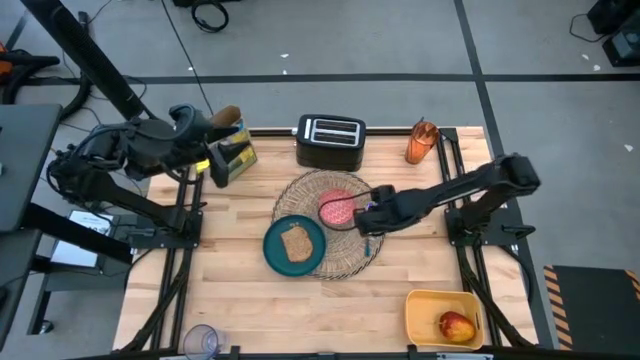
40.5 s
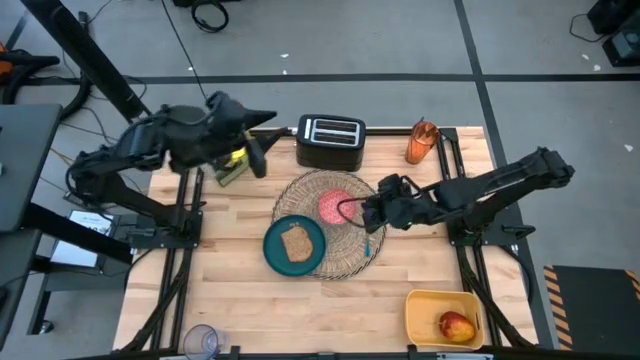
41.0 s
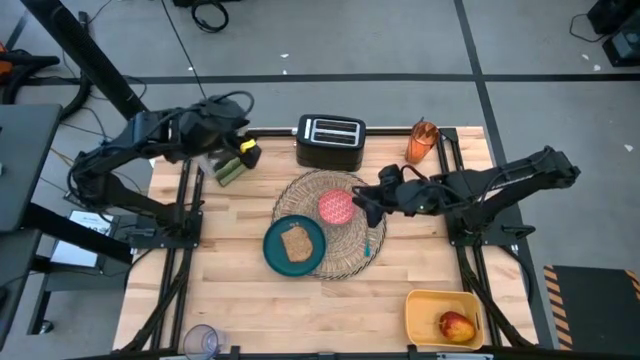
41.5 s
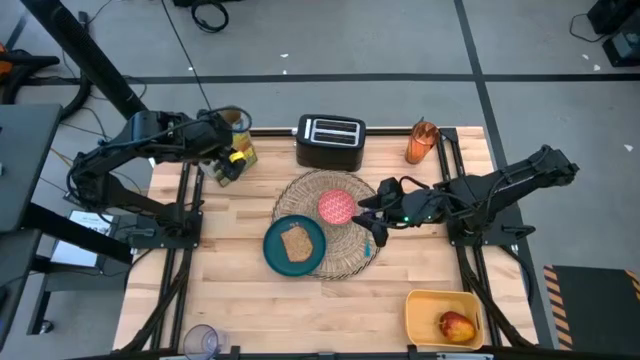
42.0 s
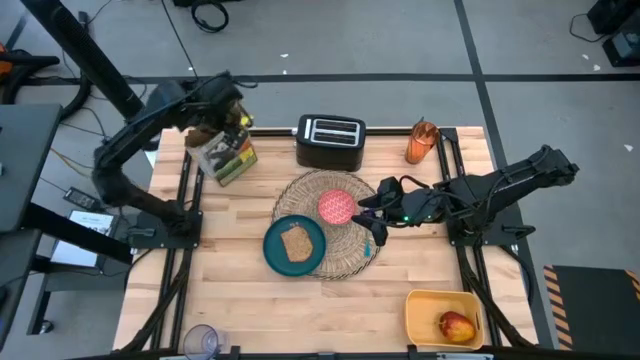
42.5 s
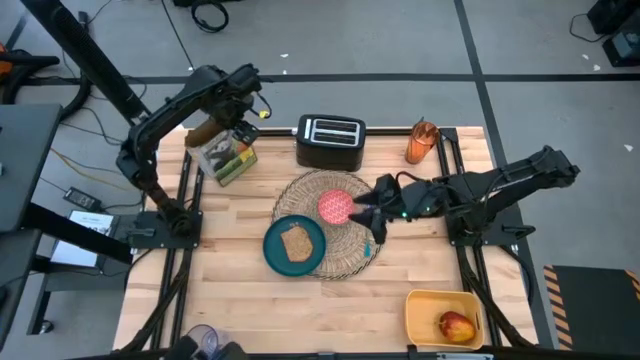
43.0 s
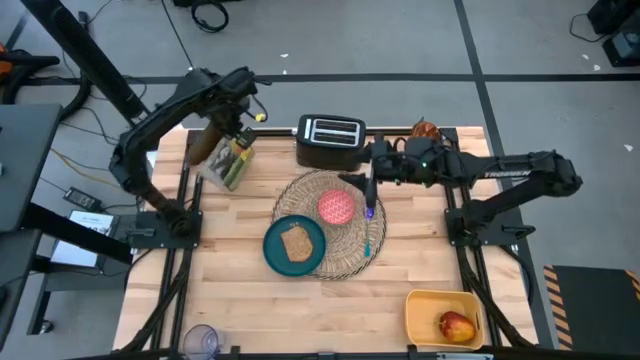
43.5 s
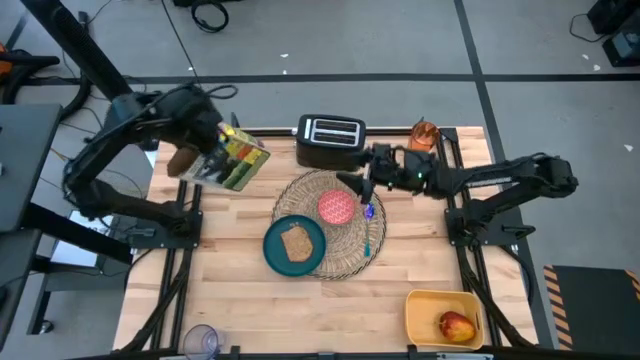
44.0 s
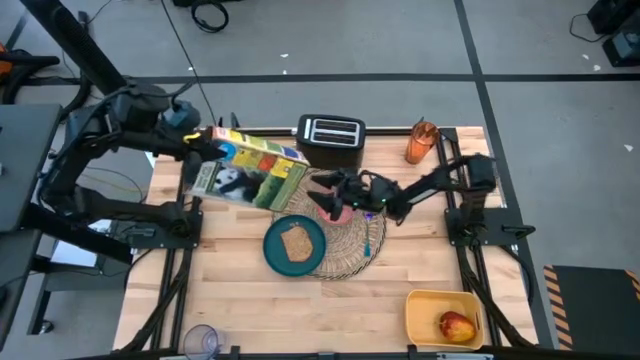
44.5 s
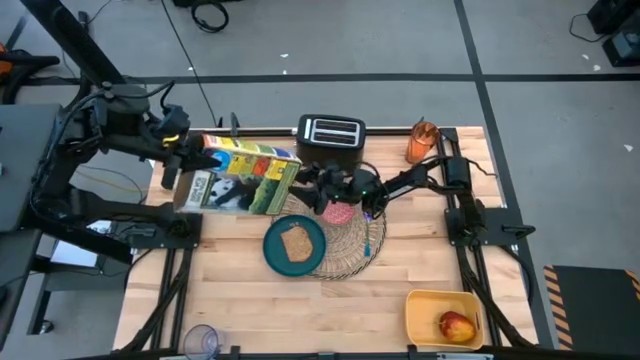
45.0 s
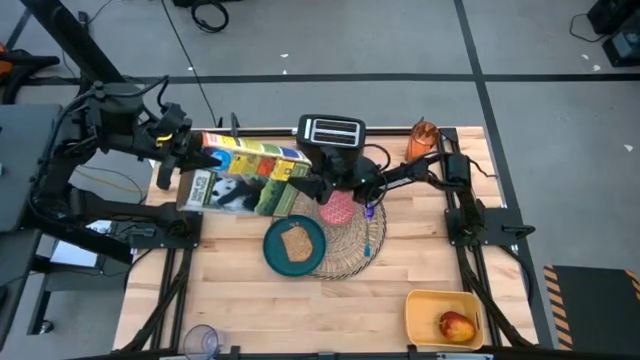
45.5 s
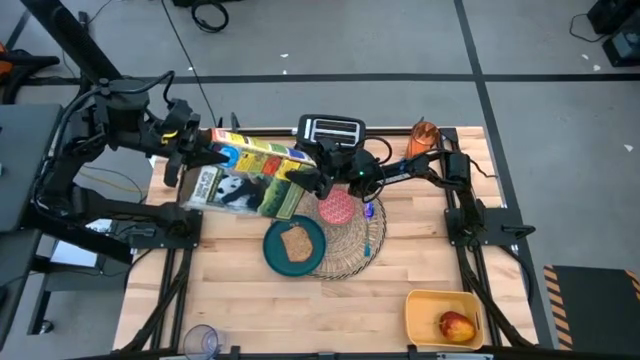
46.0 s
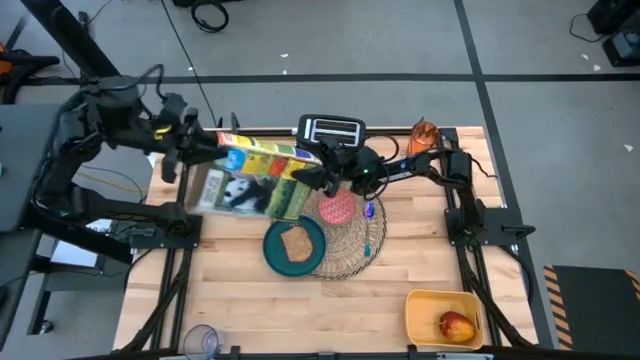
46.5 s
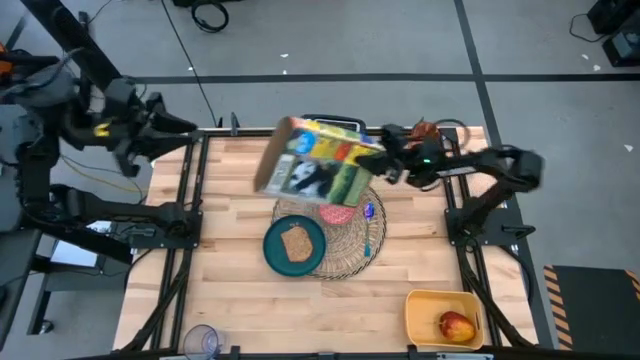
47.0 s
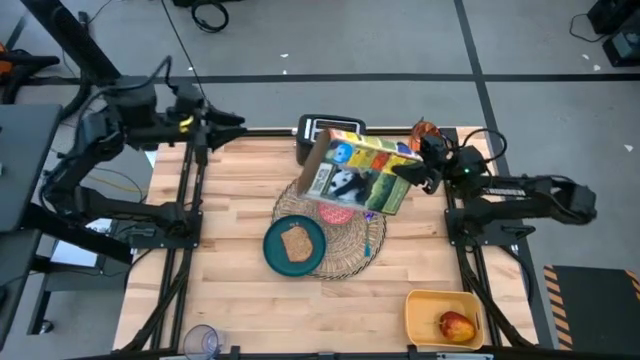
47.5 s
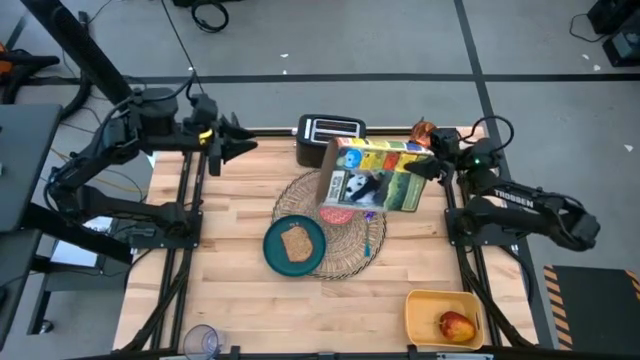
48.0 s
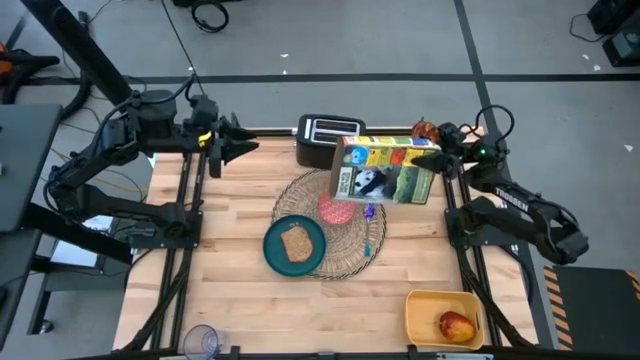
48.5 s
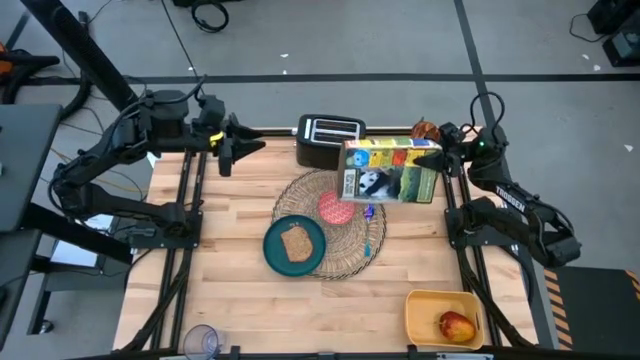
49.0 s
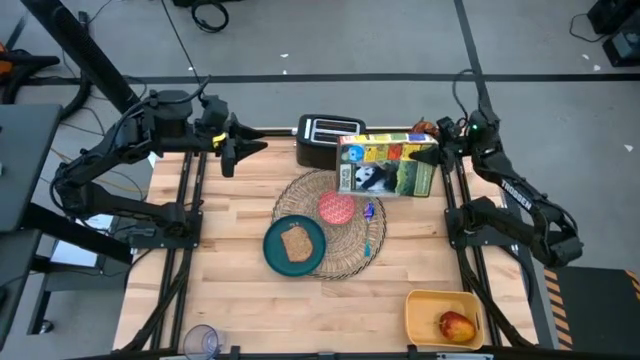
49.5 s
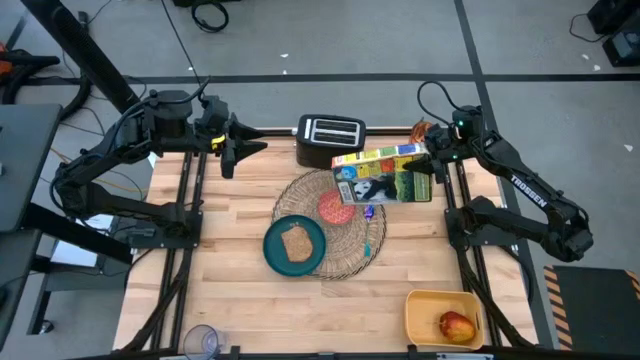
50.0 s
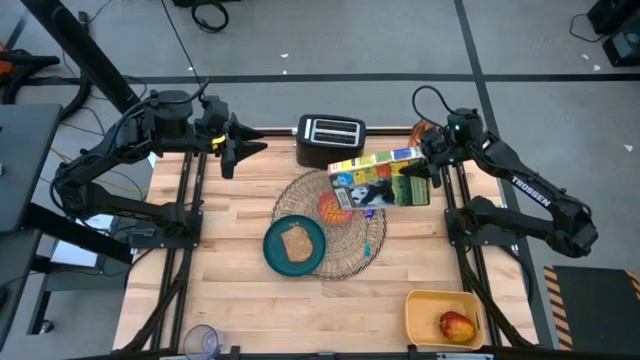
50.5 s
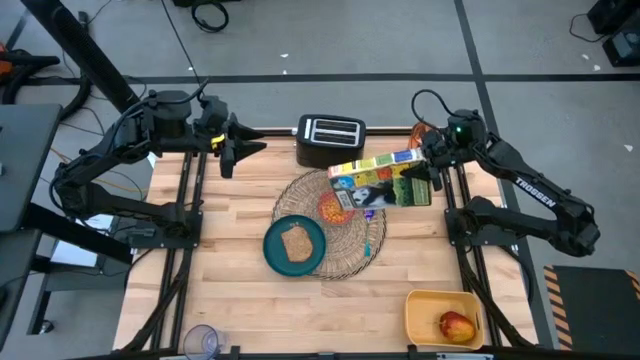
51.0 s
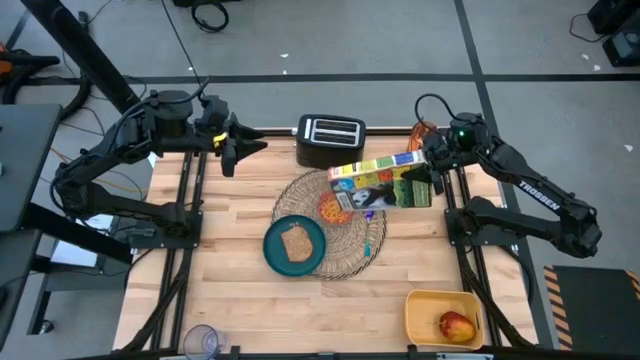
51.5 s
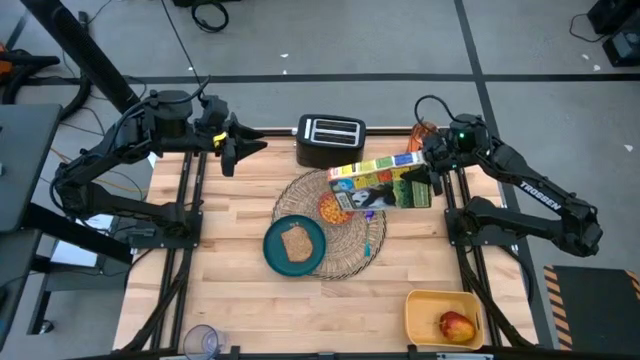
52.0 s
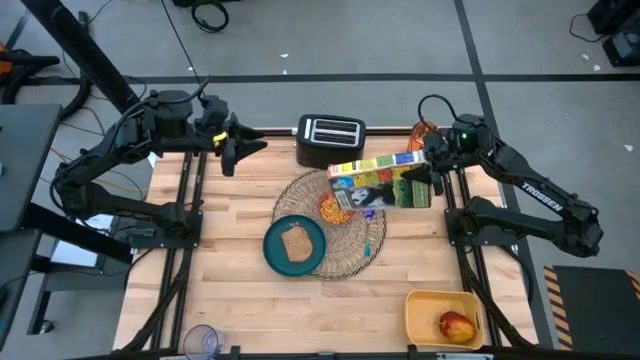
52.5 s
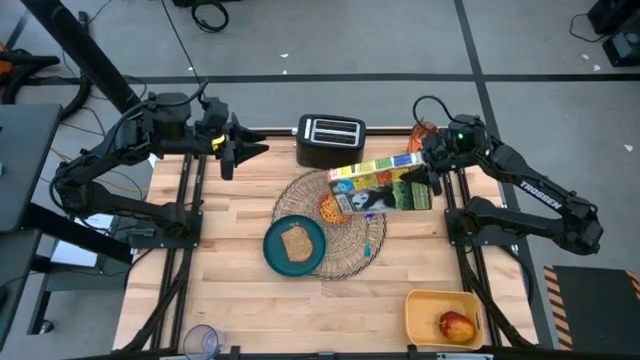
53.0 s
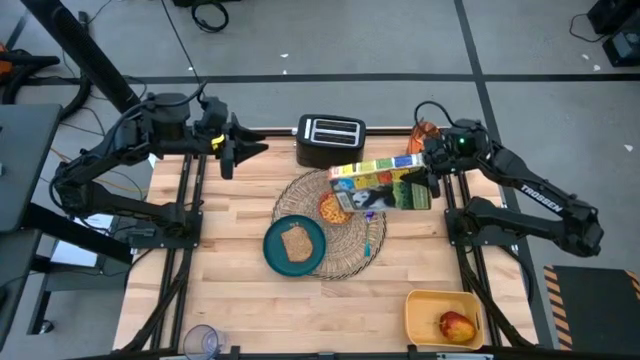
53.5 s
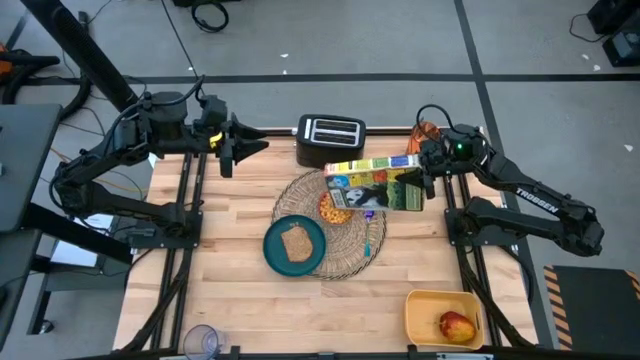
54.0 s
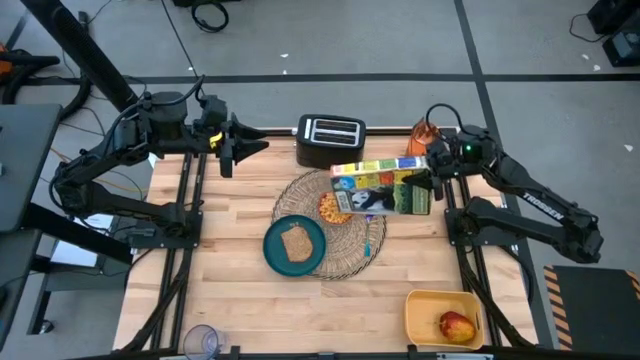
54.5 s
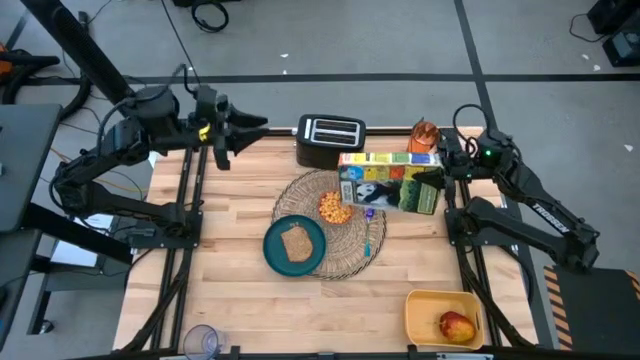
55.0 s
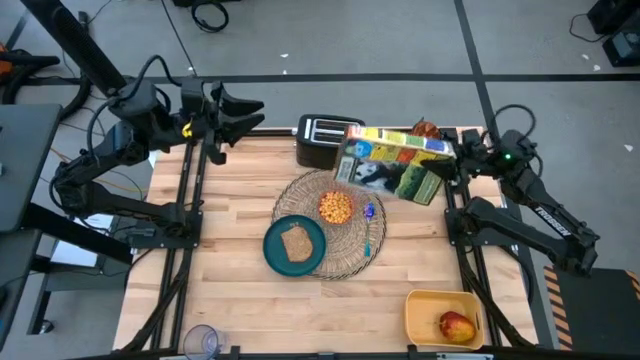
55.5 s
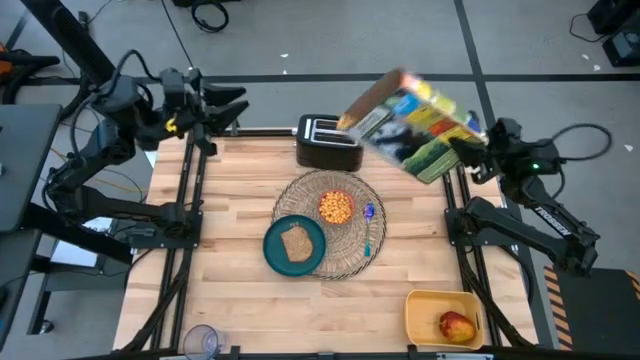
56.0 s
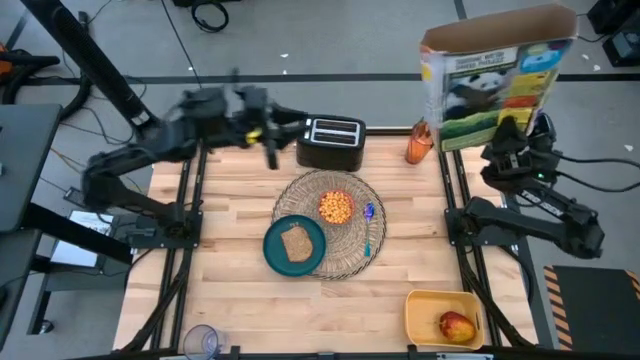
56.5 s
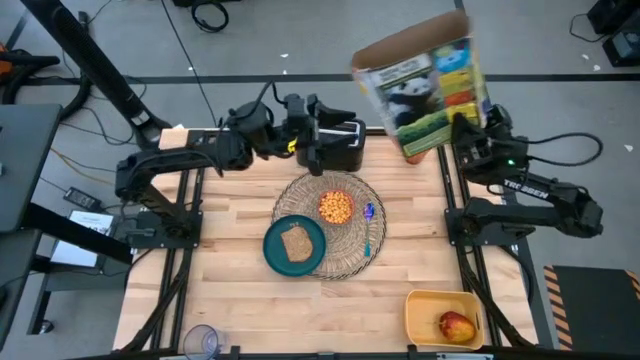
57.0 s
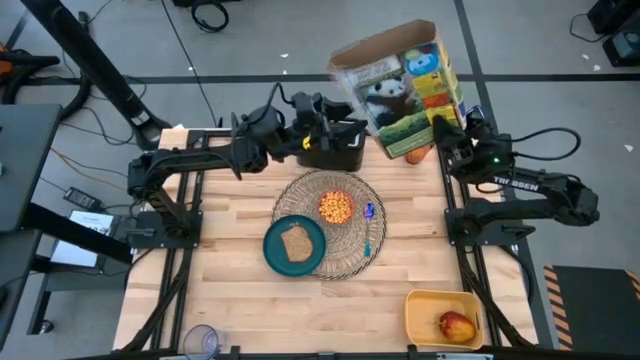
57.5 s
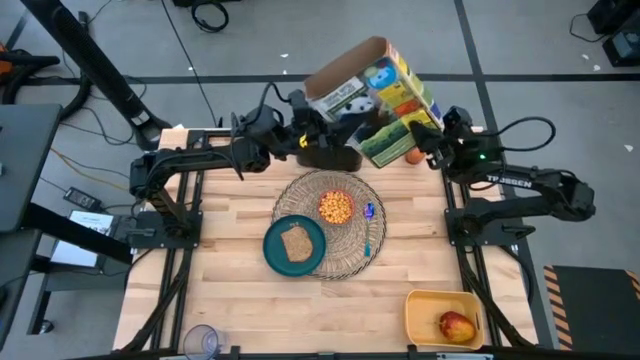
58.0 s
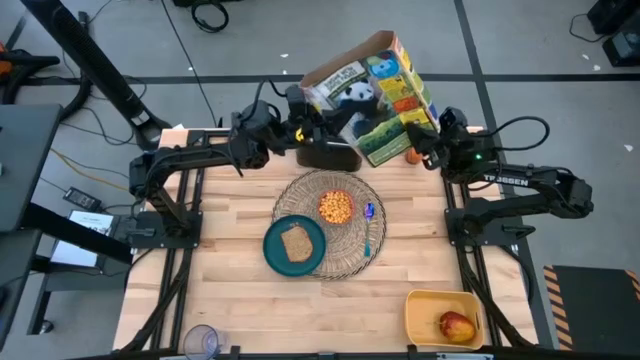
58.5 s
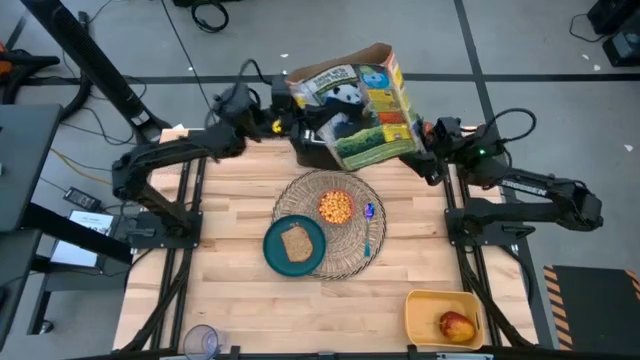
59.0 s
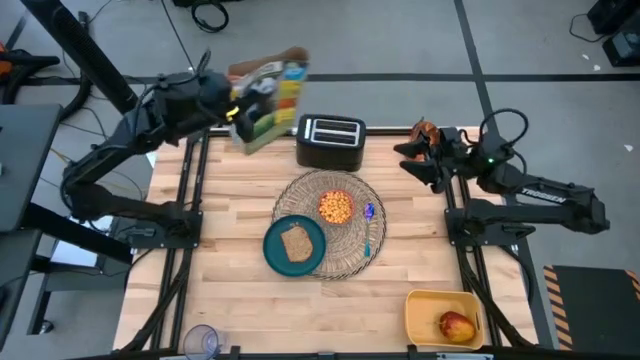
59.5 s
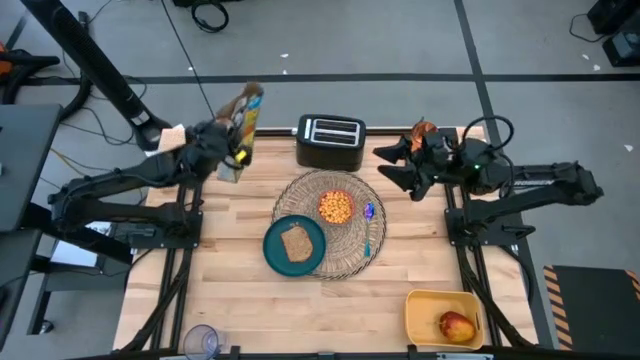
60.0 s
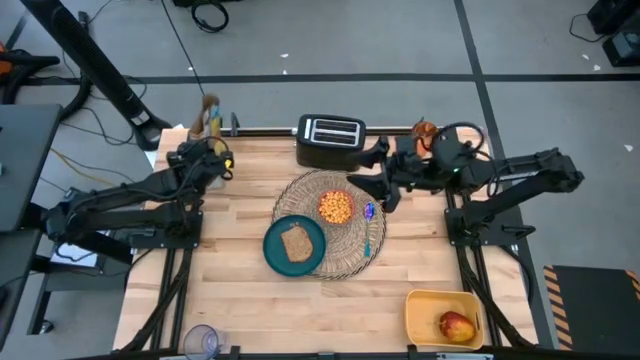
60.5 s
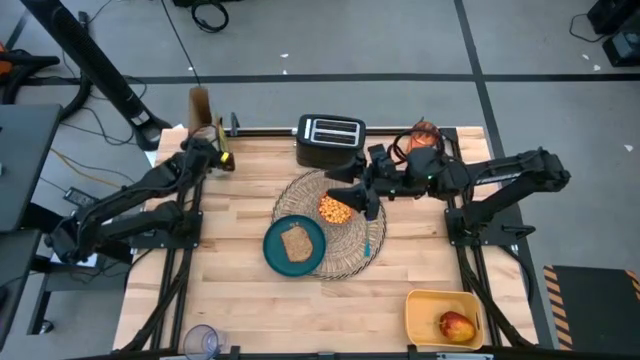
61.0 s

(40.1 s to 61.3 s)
Task: Arrange a breakfast setting
Pour the cereal into the bowl
